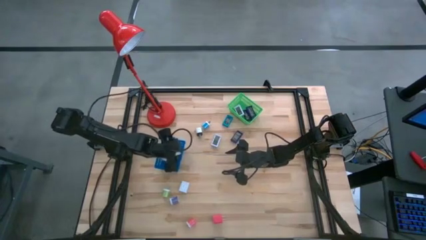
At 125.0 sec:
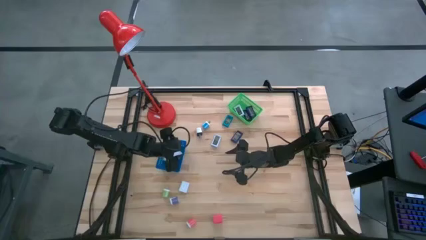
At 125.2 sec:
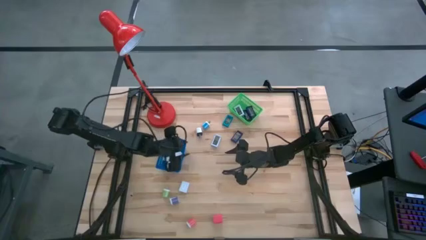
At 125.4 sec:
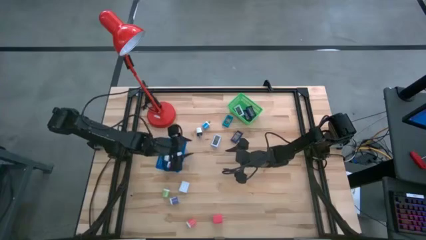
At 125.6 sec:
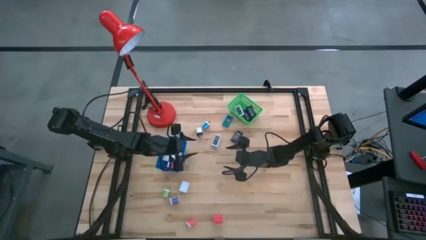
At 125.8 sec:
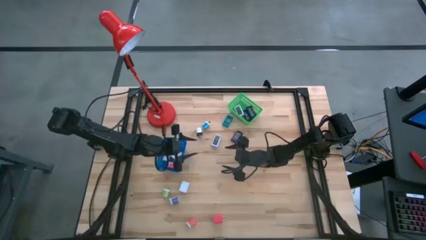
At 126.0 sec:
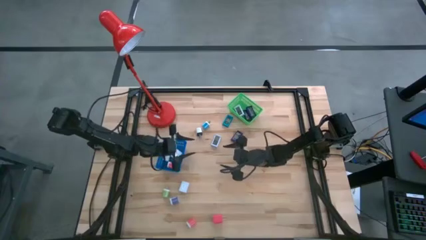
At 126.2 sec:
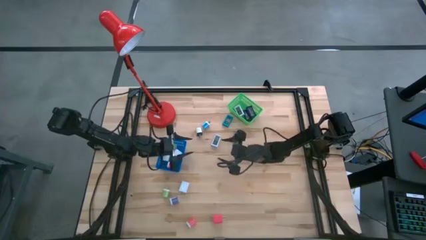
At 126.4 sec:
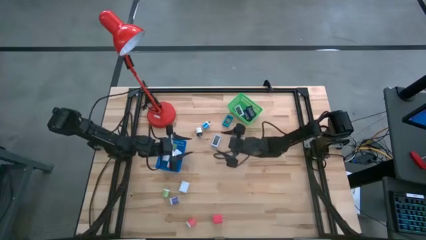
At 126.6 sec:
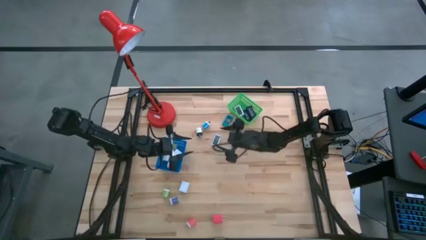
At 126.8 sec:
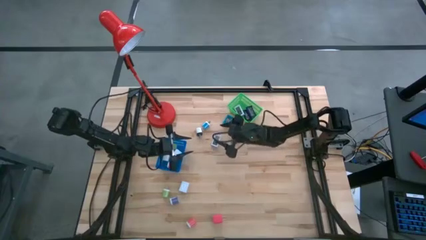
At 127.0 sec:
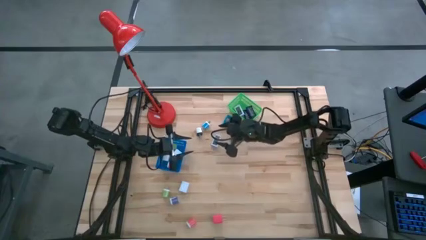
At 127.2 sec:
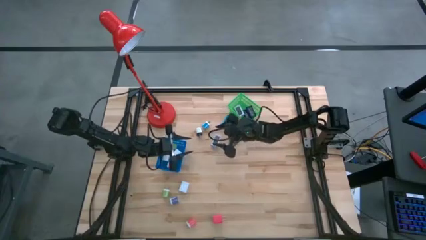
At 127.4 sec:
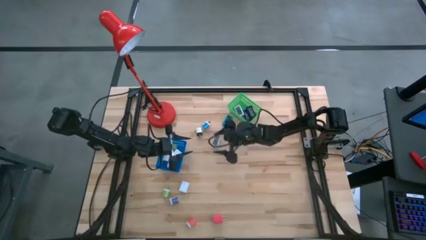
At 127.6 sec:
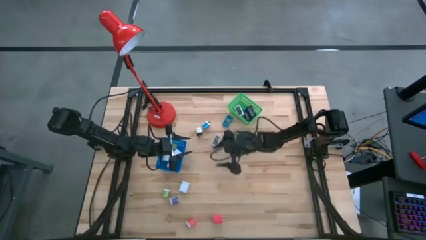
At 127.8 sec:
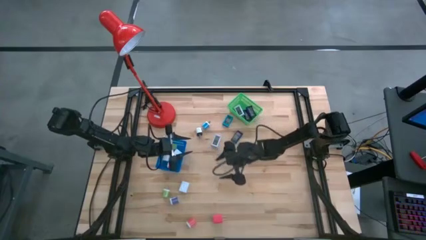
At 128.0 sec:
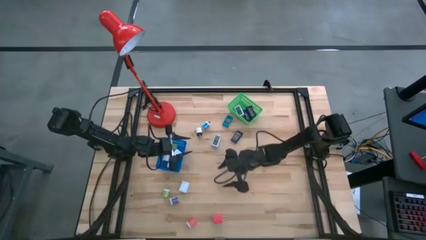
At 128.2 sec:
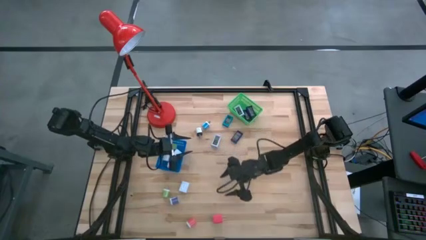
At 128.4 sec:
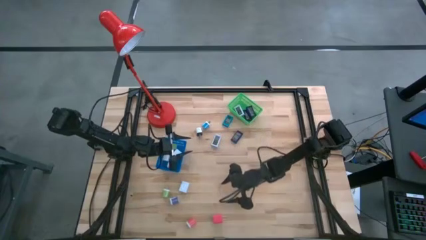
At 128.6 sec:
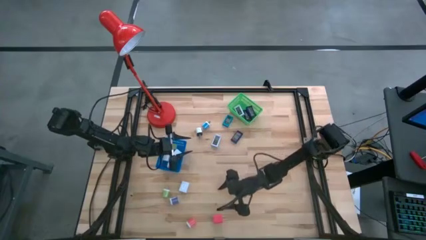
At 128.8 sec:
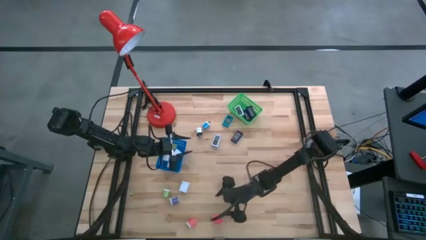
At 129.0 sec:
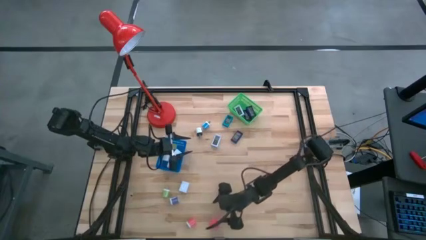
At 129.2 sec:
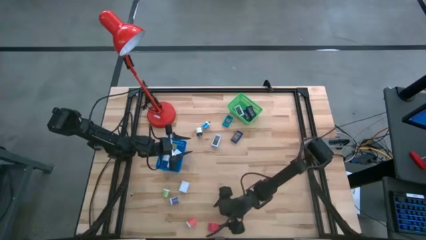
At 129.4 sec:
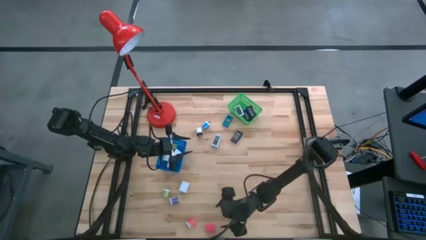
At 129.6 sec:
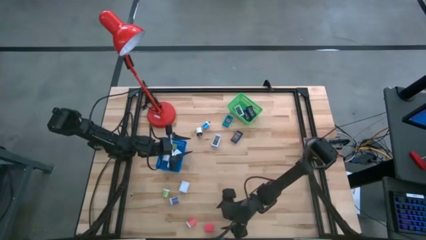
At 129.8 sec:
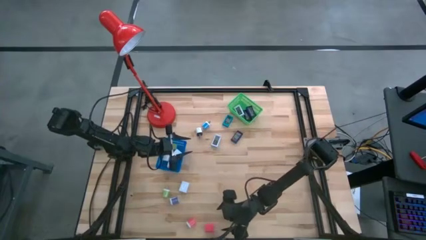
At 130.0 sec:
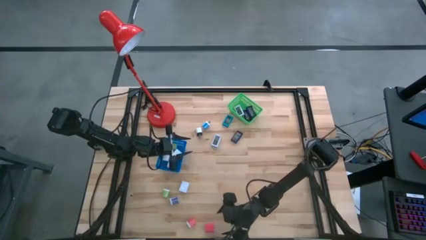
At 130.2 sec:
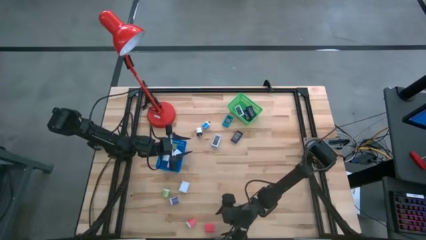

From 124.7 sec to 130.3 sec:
Task: Pick & Place Office items
Put the pink charger adapter into the blue basket

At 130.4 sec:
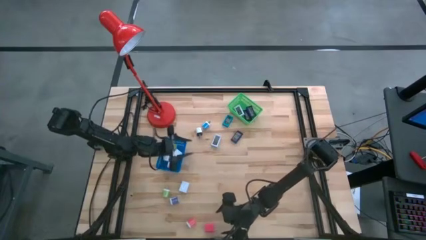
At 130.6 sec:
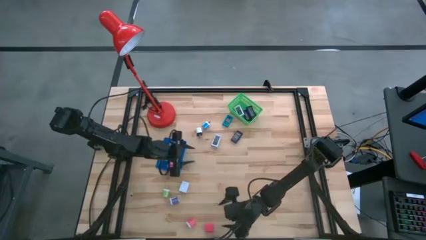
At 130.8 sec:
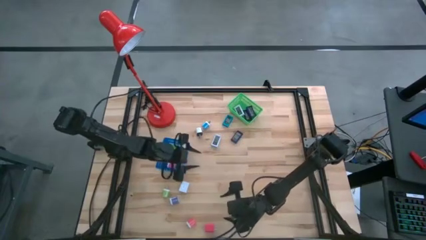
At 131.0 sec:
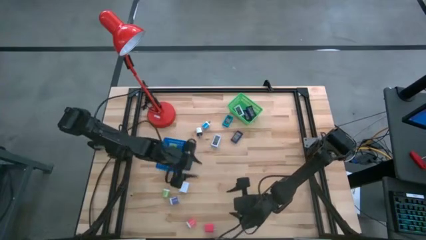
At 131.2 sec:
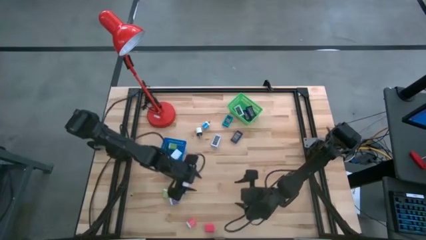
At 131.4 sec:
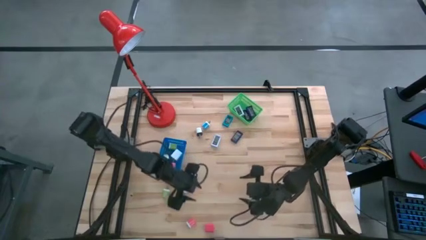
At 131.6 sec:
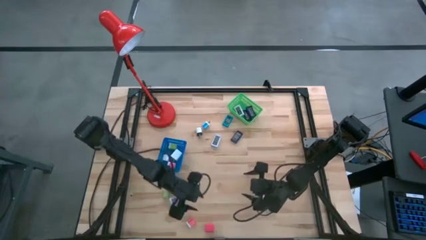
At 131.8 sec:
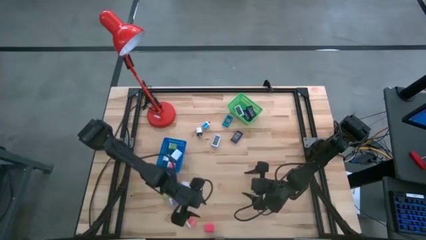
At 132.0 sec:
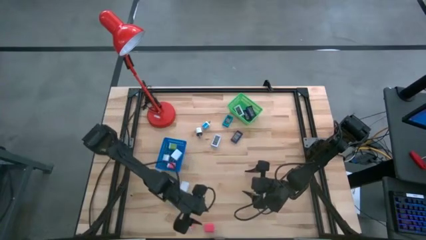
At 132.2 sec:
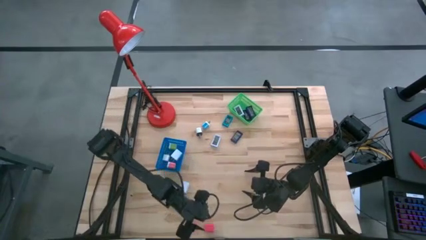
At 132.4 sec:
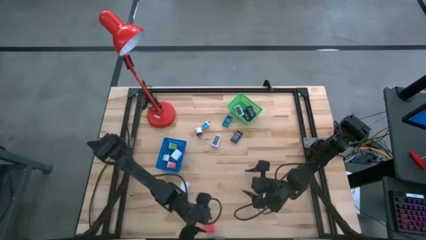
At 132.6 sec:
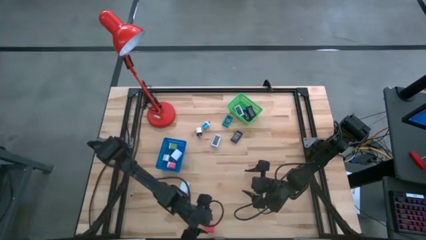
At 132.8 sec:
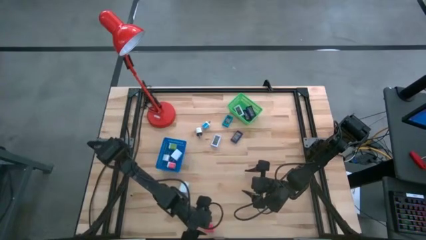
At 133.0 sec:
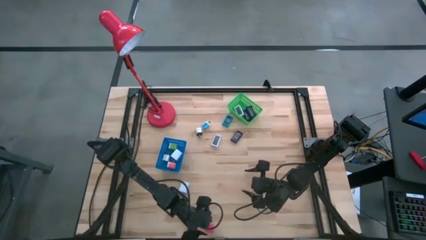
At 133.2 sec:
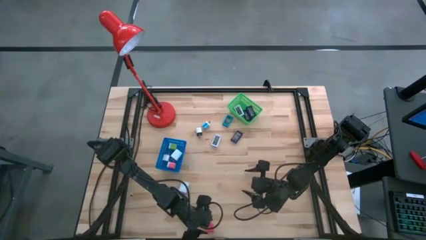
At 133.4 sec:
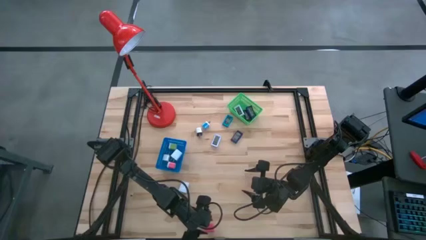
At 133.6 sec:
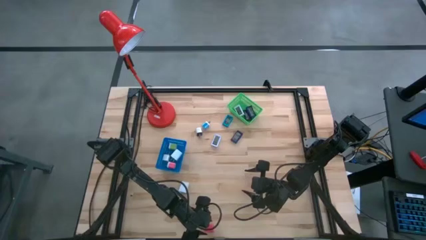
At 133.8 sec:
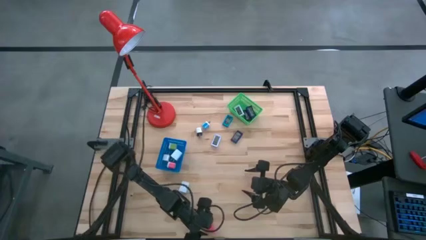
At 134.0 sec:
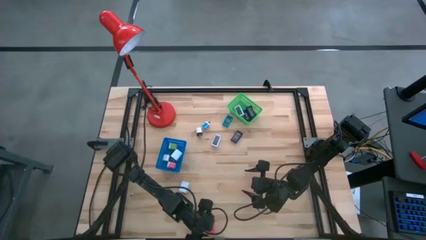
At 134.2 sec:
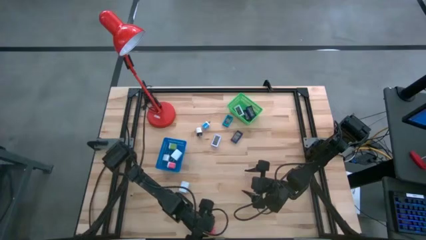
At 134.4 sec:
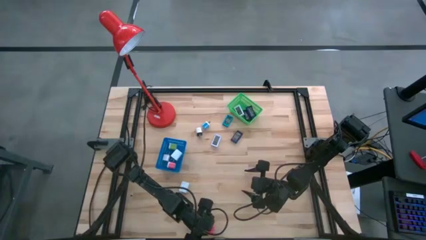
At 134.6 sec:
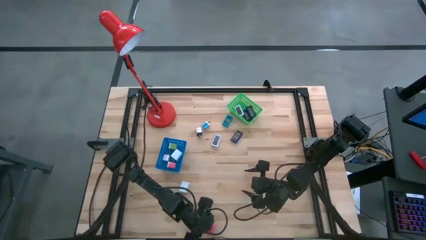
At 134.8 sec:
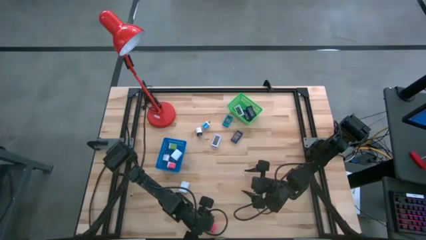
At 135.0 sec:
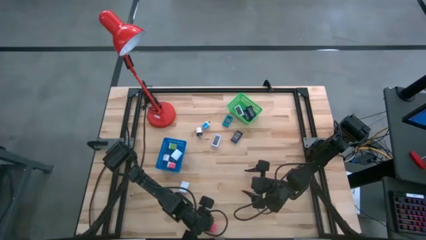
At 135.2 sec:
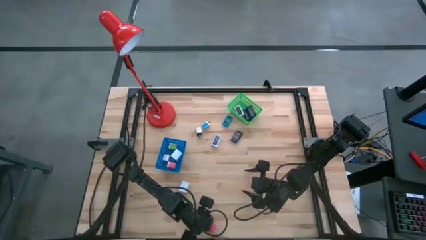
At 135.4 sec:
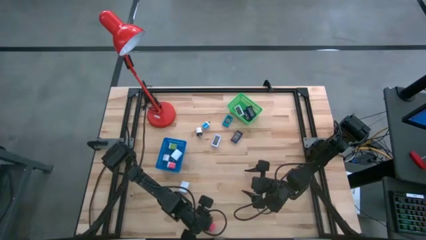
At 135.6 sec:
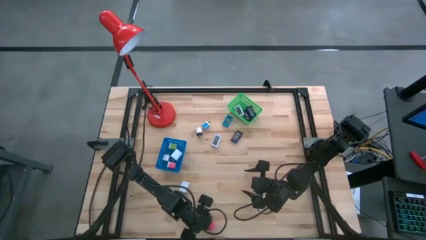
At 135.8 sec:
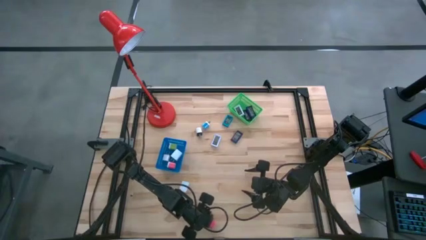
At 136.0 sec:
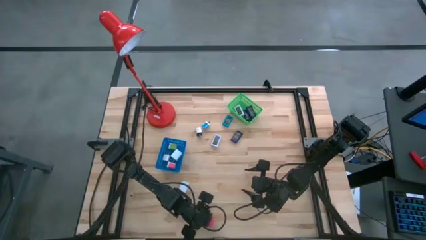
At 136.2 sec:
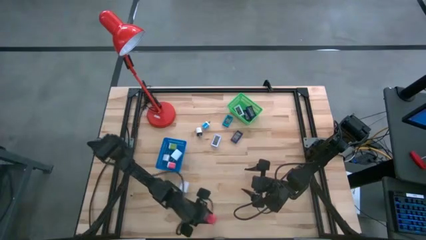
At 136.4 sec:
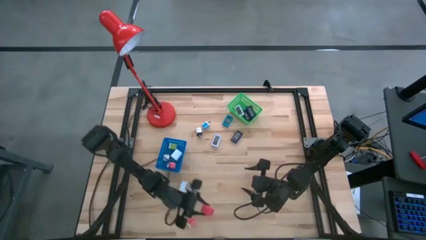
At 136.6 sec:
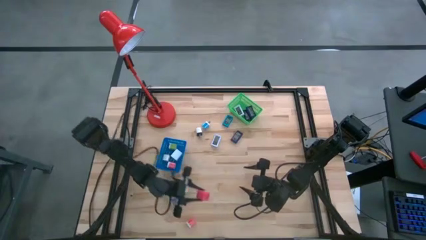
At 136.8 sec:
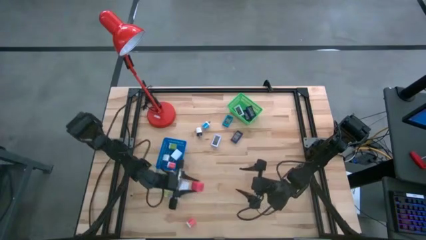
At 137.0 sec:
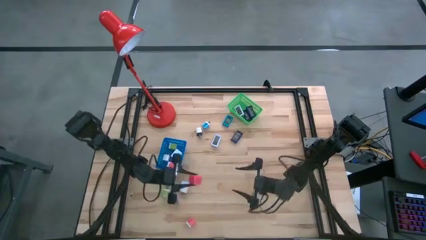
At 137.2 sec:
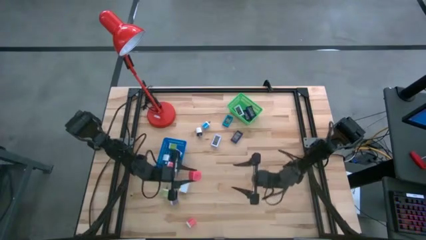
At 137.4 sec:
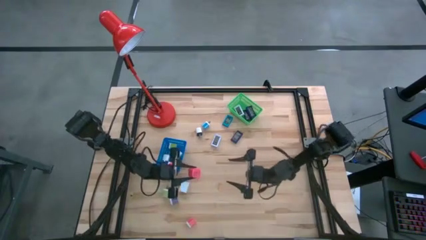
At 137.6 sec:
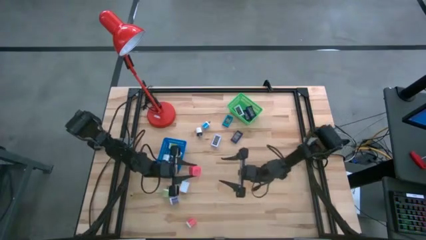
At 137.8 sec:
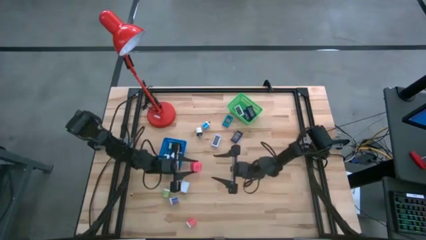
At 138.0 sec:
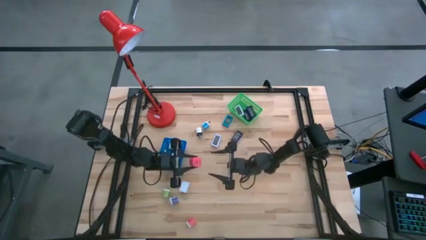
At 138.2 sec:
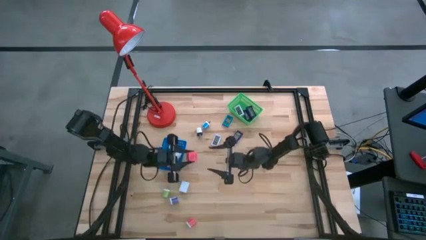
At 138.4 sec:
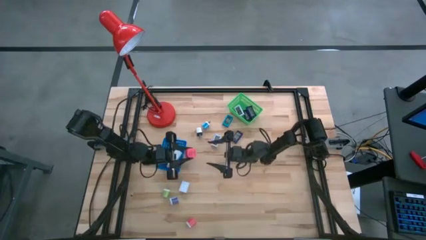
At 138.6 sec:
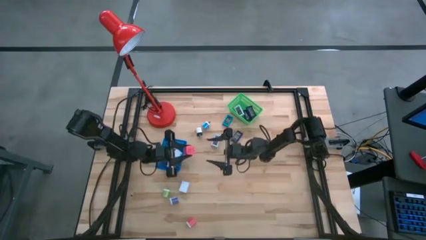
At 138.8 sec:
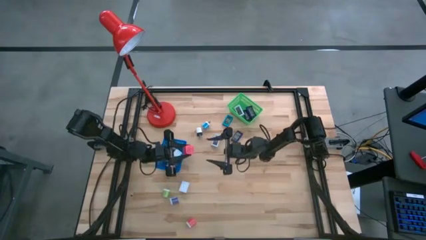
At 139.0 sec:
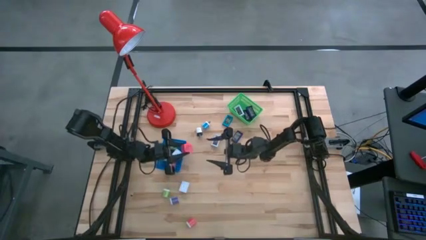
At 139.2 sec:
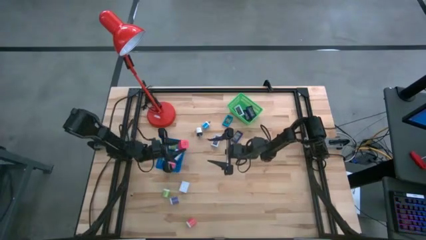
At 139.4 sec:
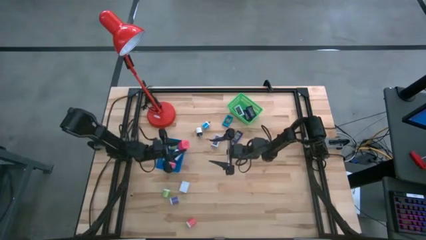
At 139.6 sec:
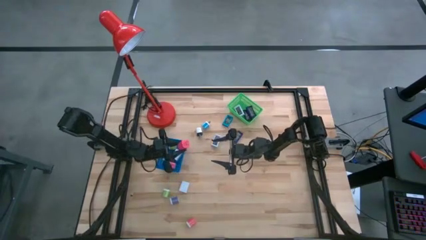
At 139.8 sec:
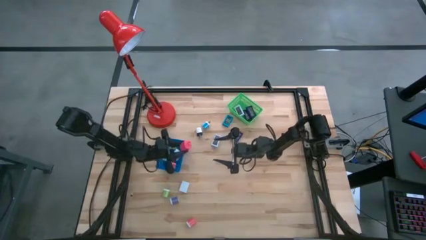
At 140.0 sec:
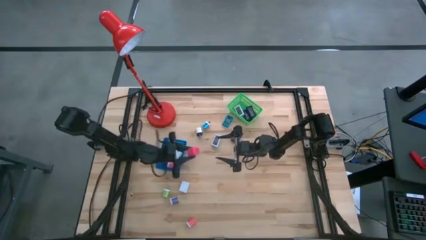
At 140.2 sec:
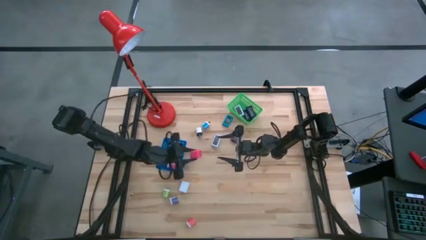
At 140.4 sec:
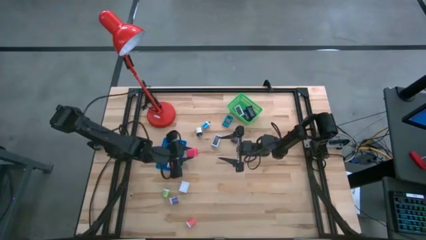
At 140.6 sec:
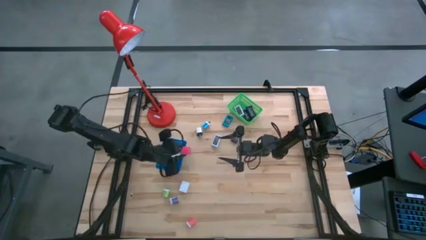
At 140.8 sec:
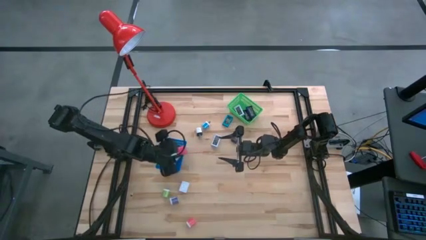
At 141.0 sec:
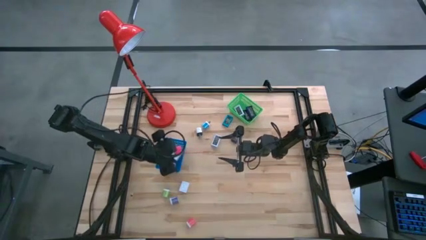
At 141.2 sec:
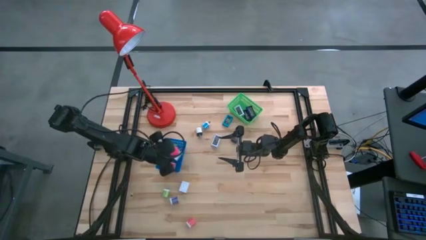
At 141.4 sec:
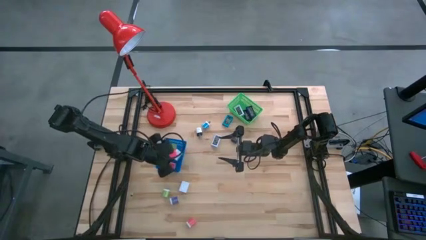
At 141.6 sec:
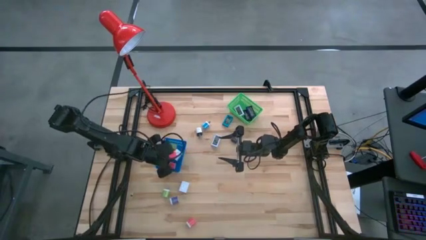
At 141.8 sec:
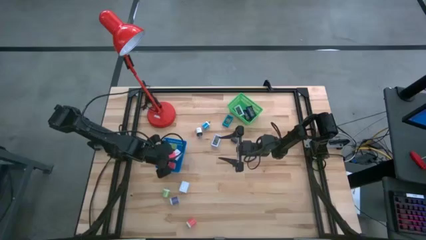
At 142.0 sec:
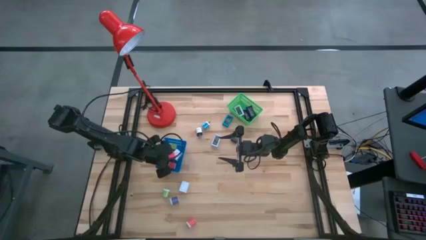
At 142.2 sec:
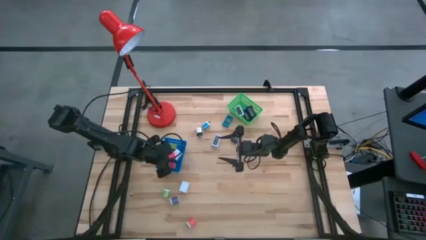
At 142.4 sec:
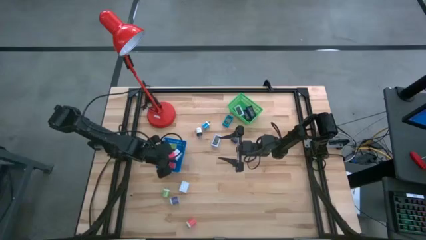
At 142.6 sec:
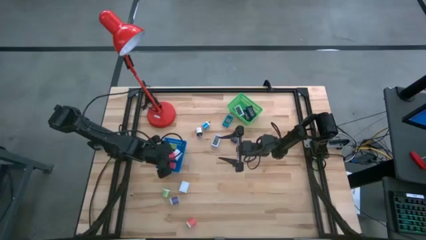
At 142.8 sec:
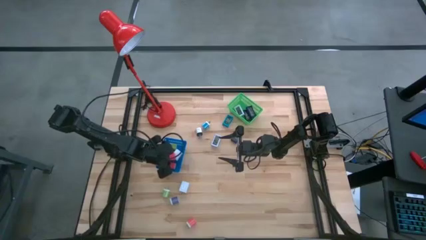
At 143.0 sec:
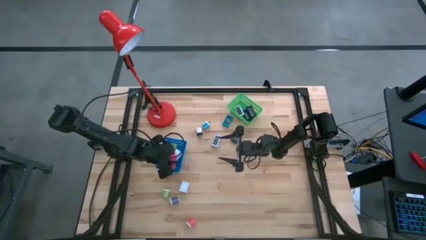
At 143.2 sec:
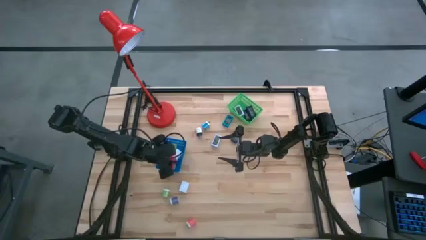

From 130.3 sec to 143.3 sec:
Put the pink charger adapter into the blue basket
